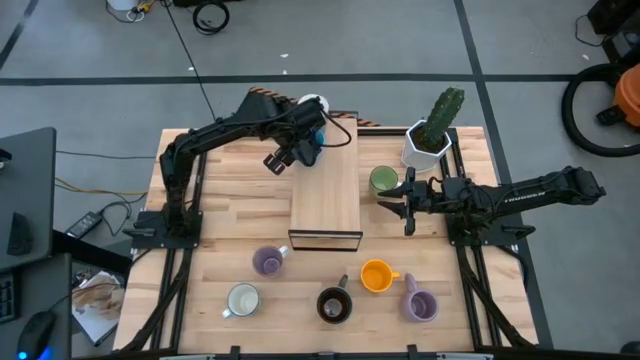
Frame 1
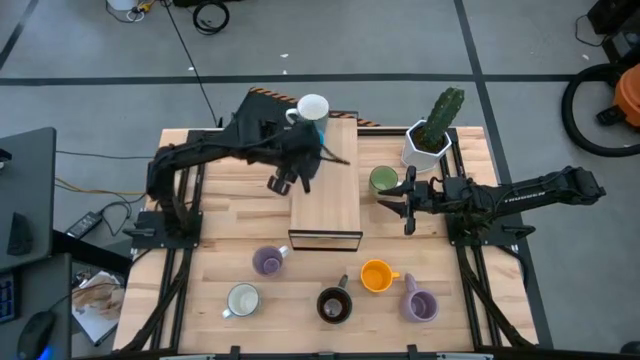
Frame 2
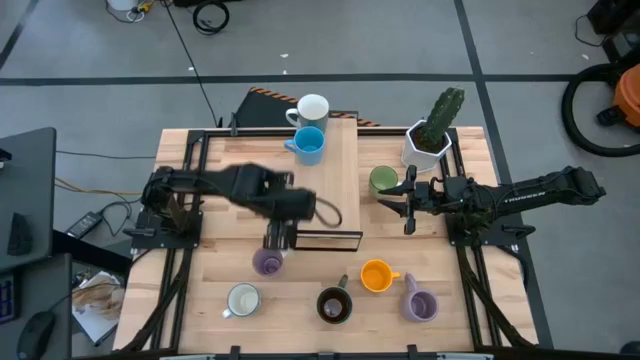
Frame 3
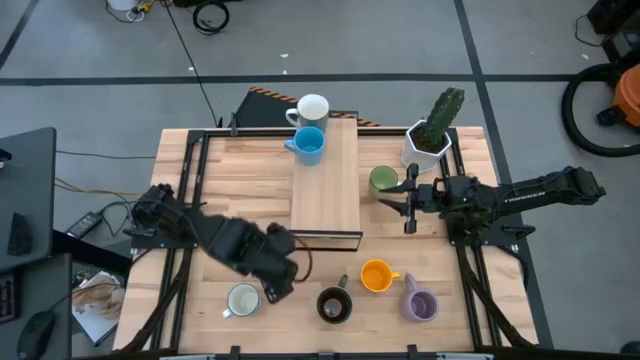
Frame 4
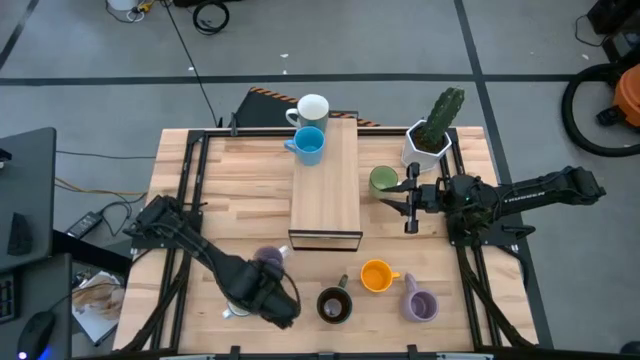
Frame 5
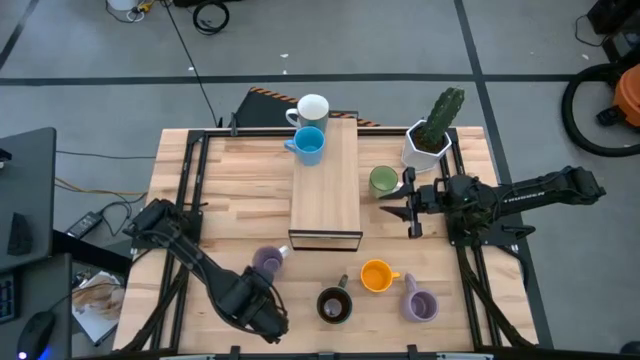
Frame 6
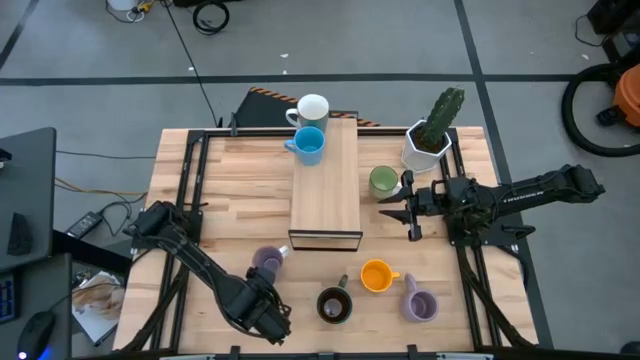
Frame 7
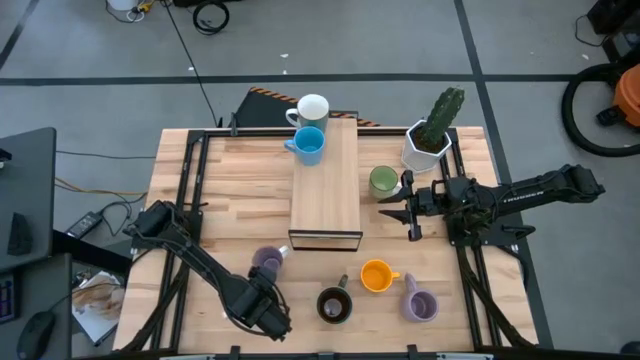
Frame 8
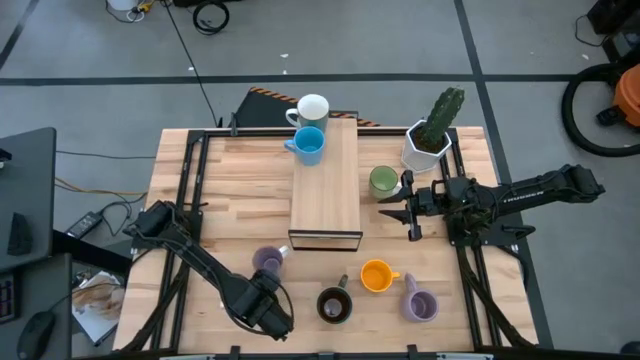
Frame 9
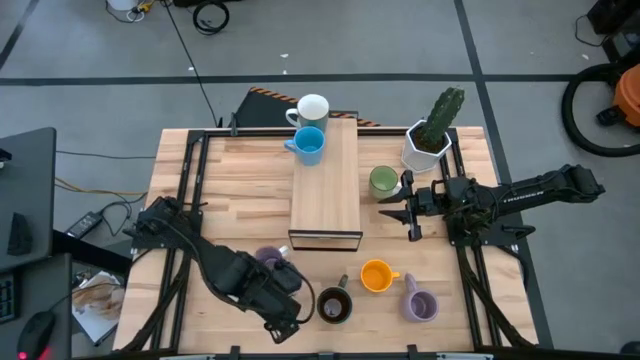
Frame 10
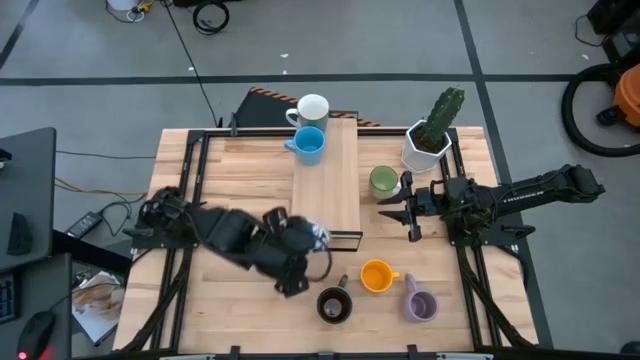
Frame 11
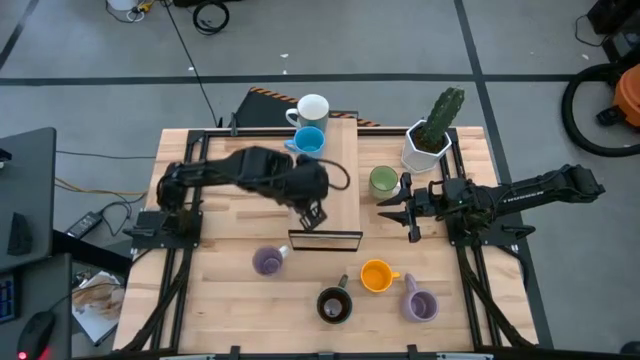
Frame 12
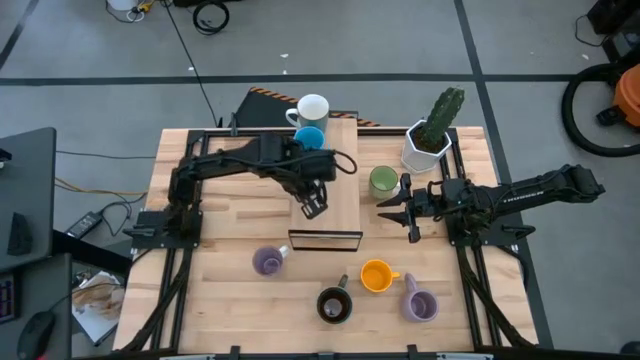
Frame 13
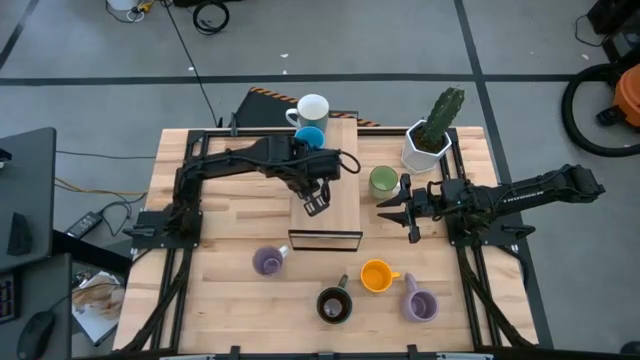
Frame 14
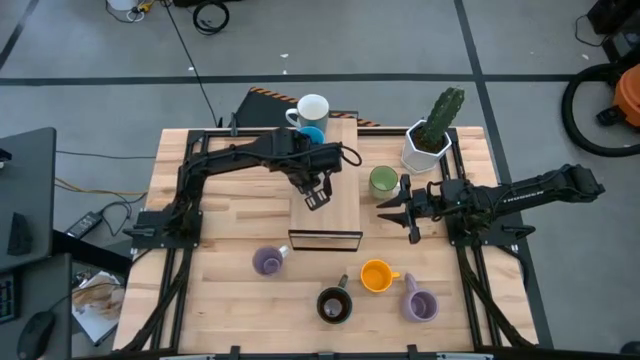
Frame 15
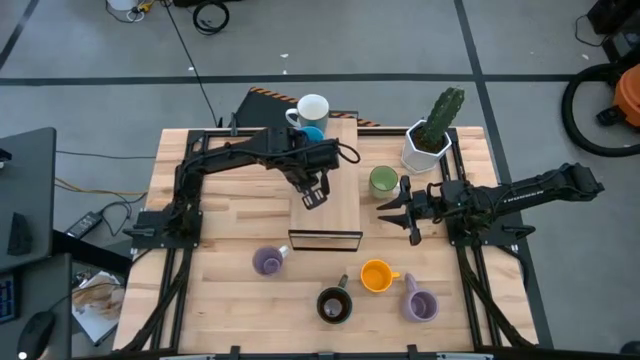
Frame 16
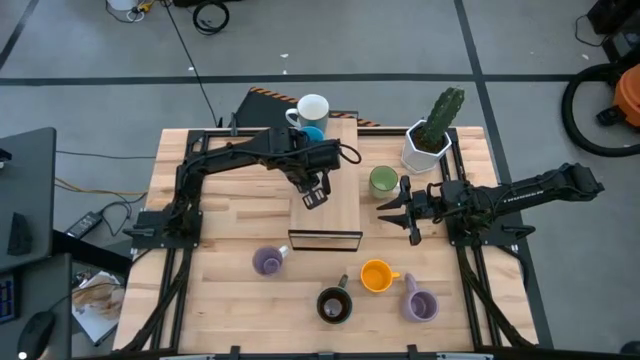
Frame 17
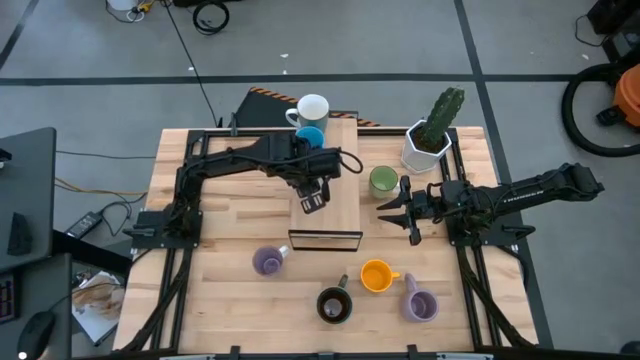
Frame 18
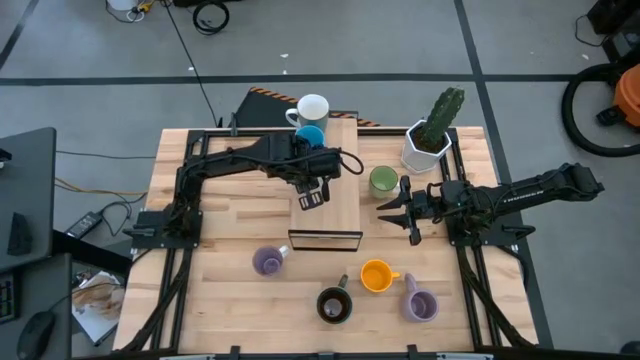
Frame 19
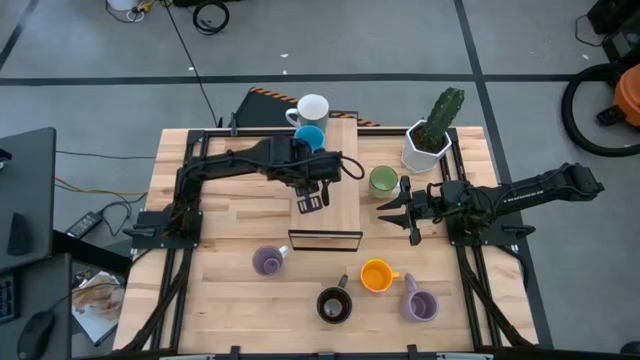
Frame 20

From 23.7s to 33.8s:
Task: Place coffee mugs
Put the blue patterned mug on the shelf

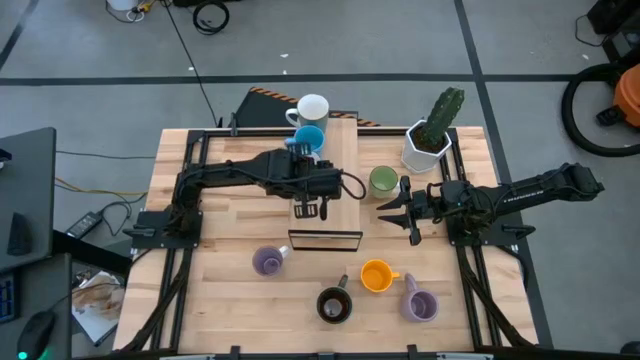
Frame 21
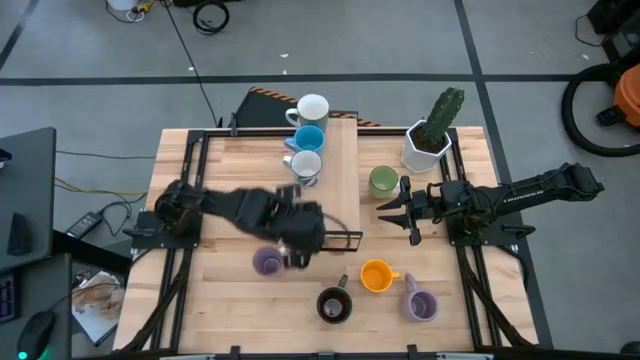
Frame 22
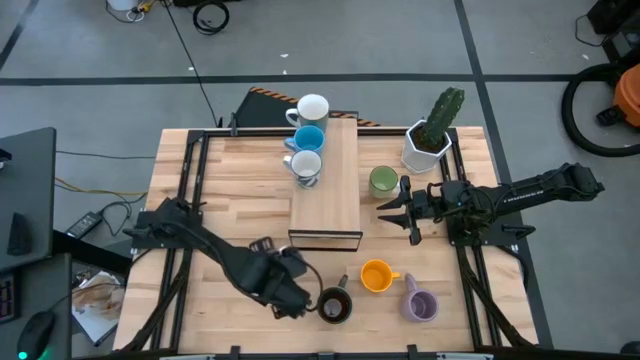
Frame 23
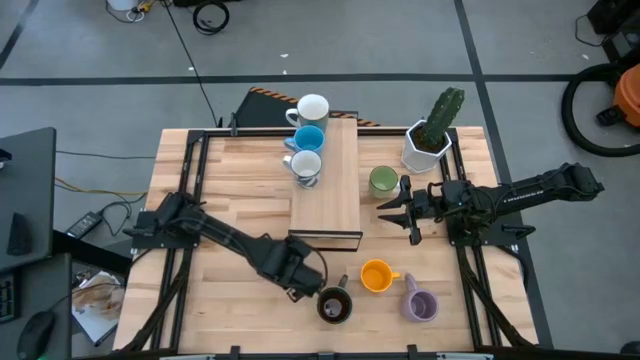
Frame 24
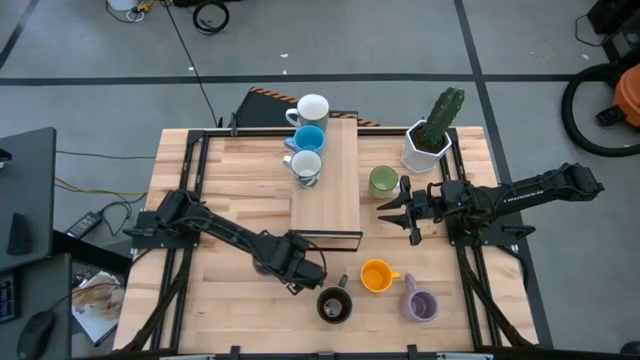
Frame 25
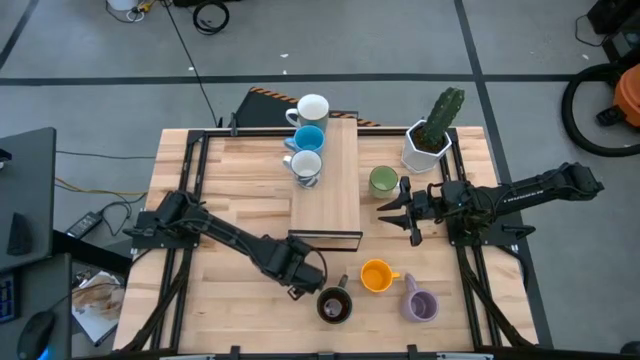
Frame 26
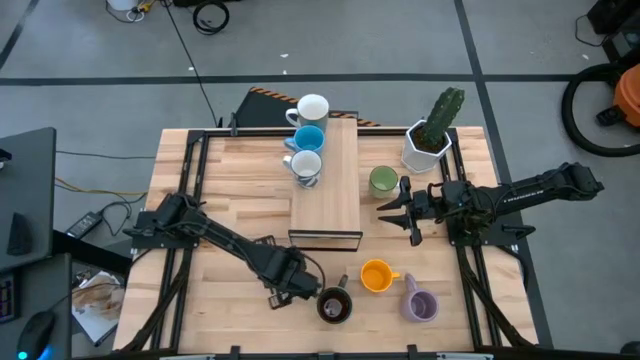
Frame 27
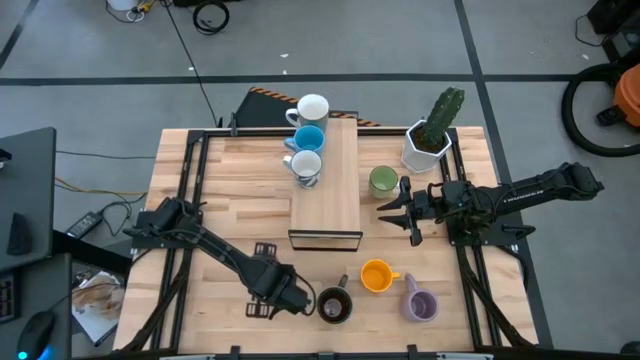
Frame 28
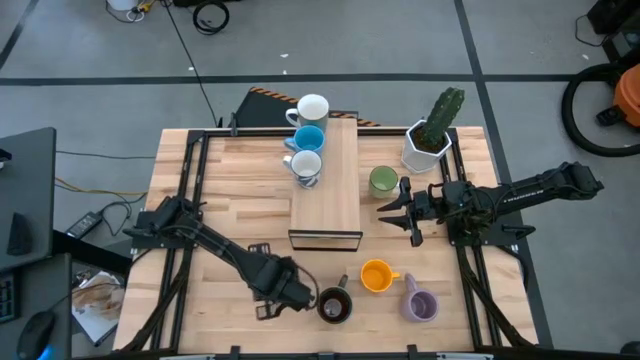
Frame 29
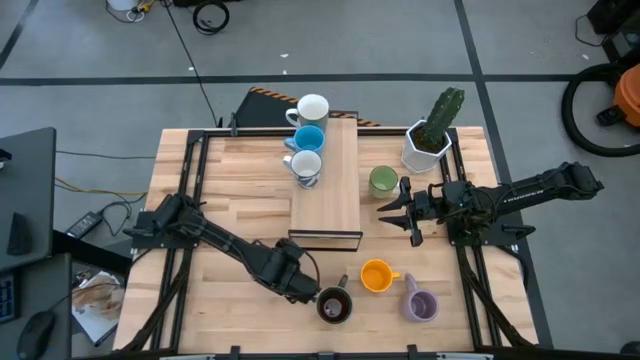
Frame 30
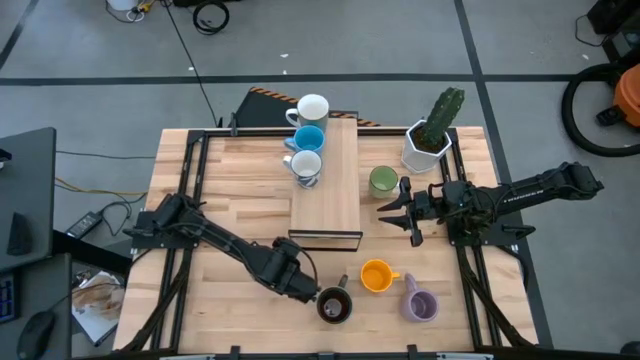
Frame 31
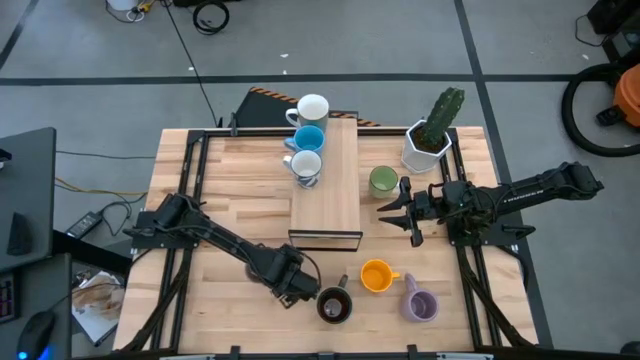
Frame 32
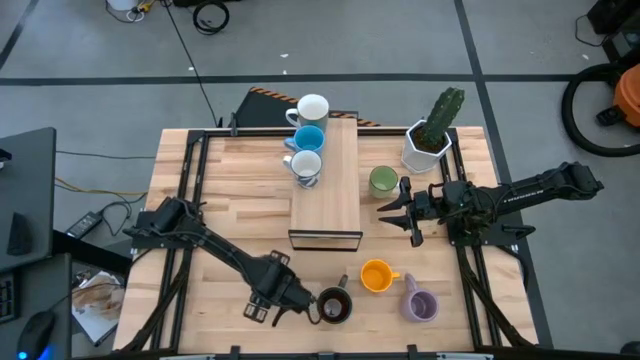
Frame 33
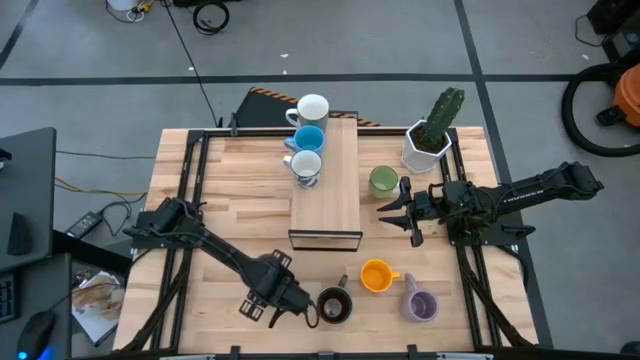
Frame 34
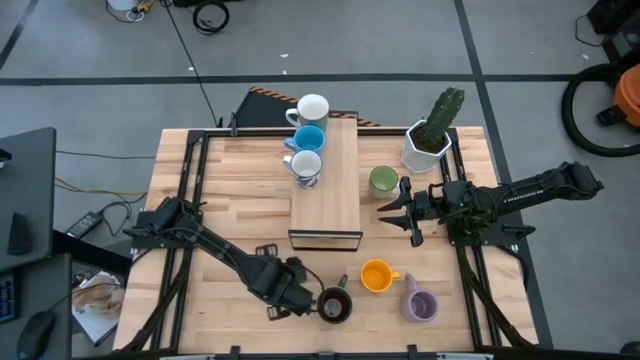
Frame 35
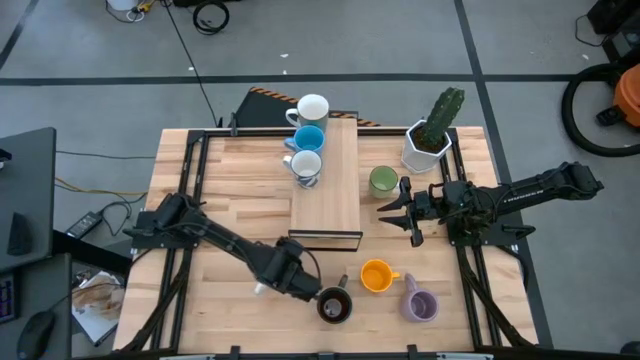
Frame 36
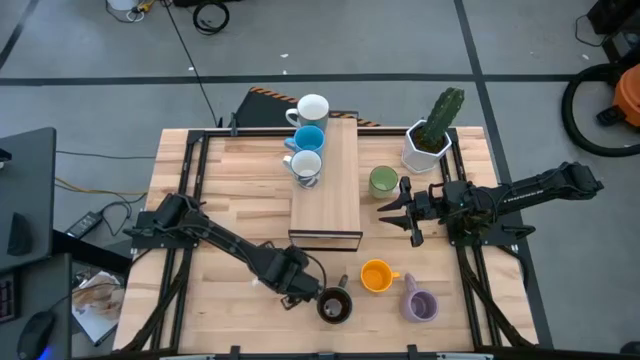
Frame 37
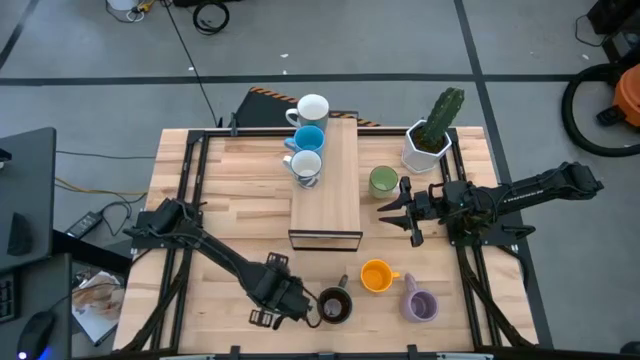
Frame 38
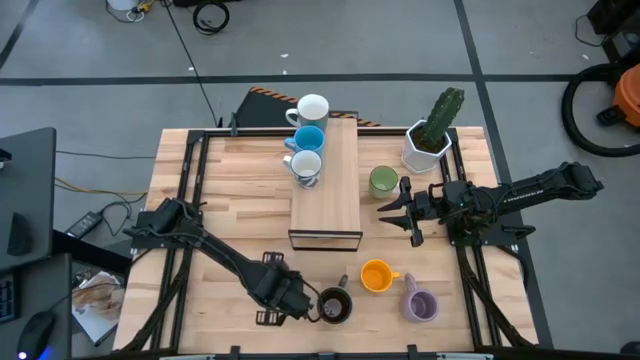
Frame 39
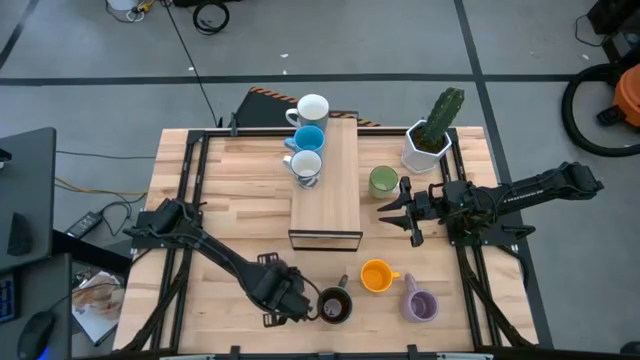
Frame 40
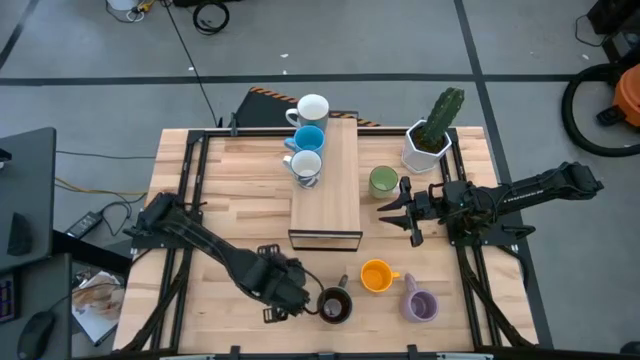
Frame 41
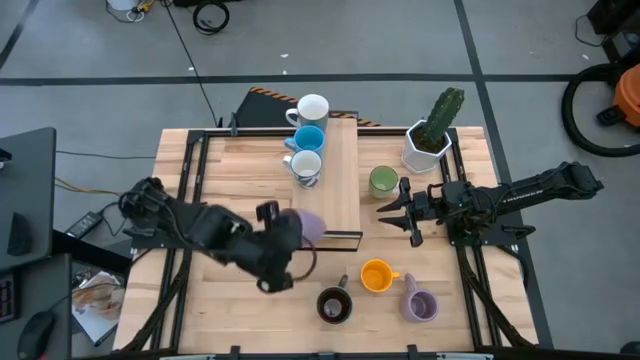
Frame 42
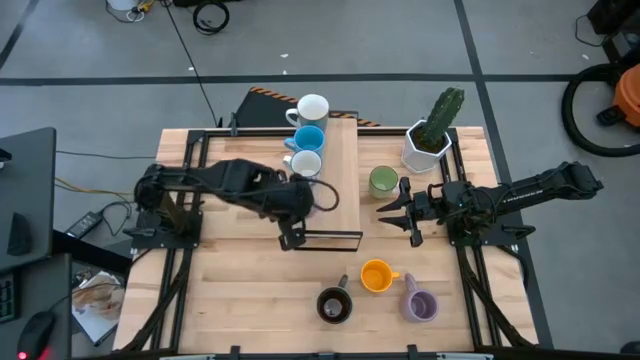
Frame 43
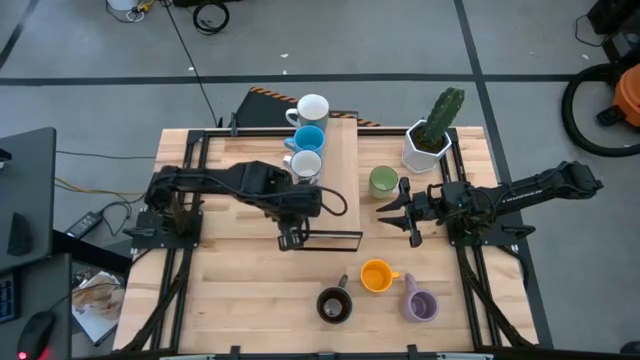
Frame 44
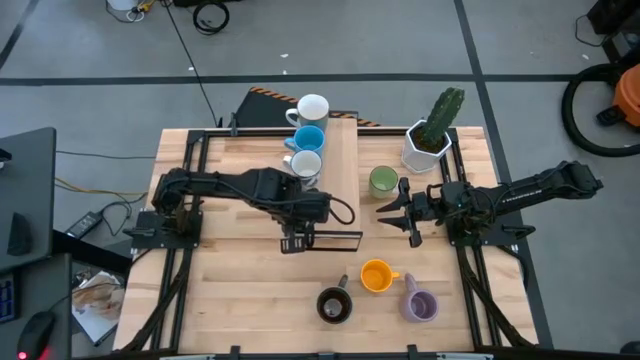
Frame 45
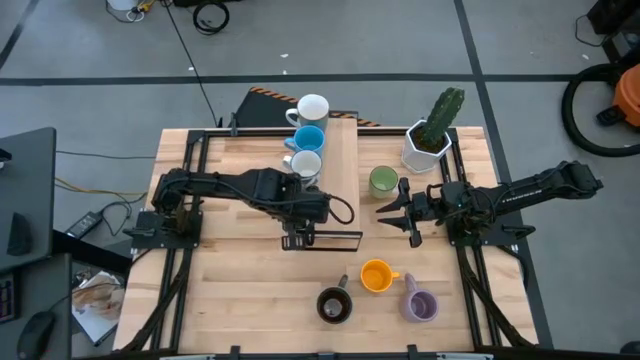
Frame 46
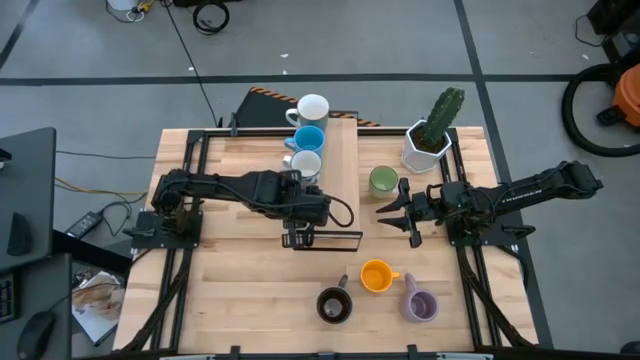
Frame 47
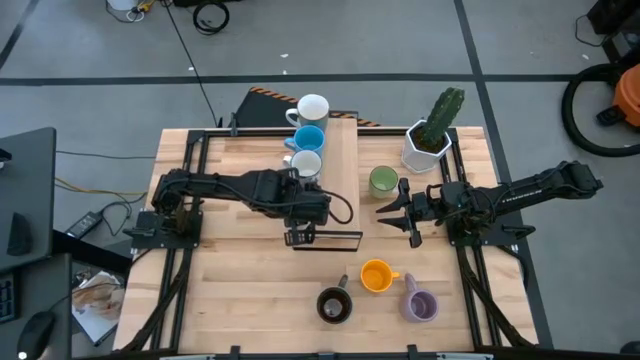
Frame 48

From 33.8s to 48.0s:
Put the purple patterned mug on the shelf
